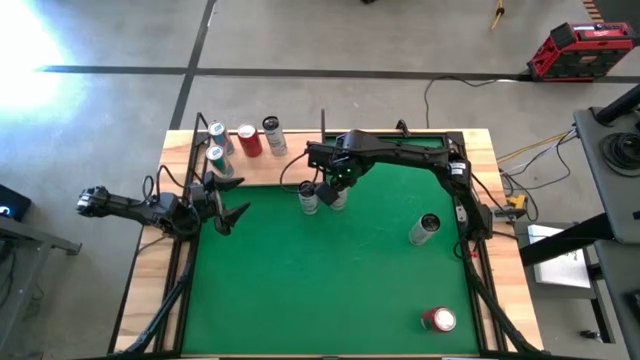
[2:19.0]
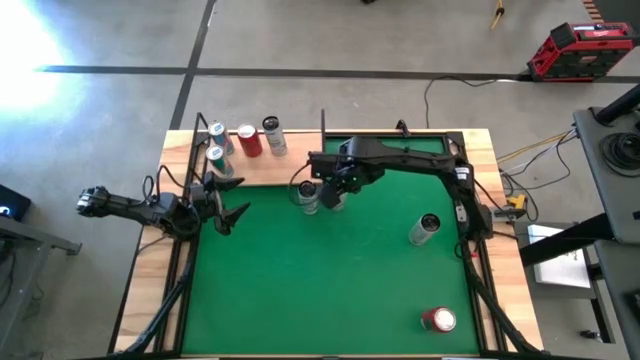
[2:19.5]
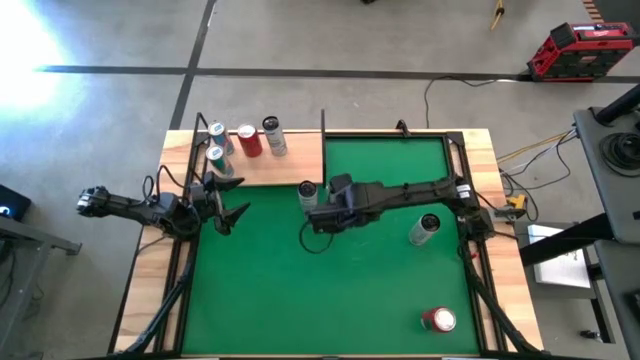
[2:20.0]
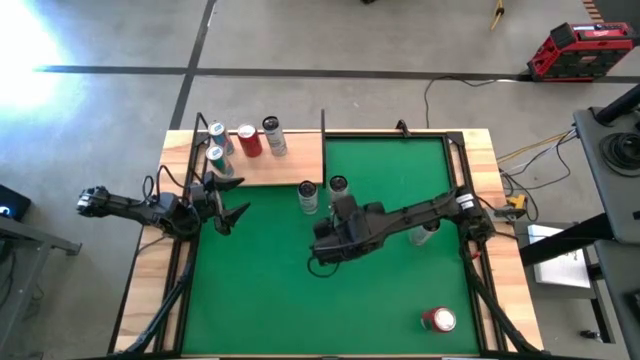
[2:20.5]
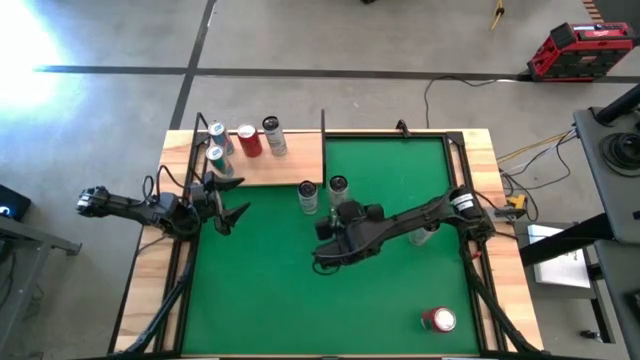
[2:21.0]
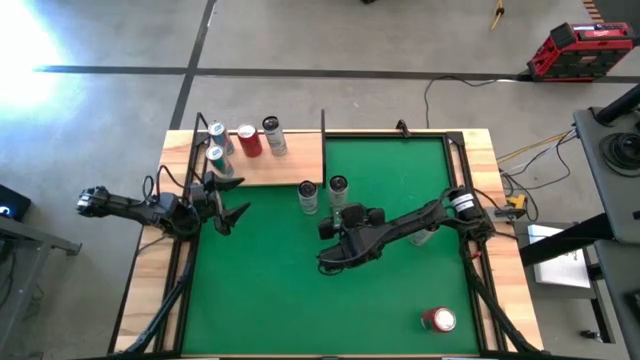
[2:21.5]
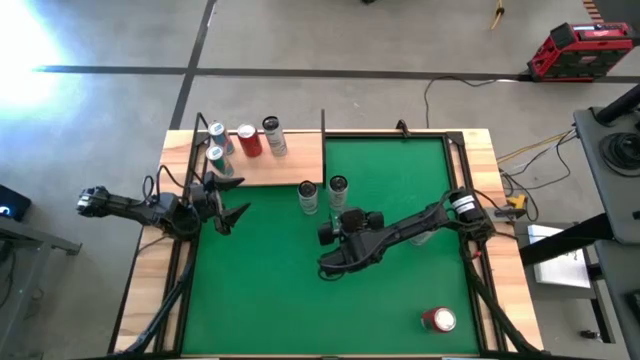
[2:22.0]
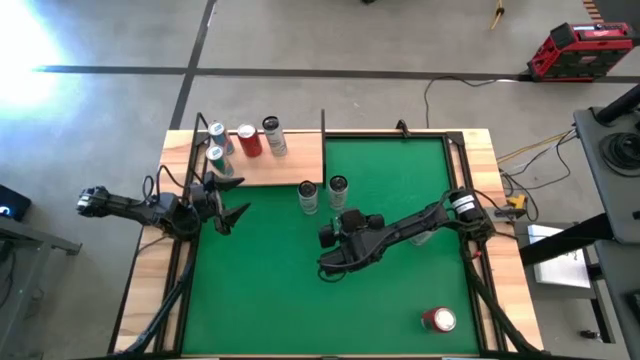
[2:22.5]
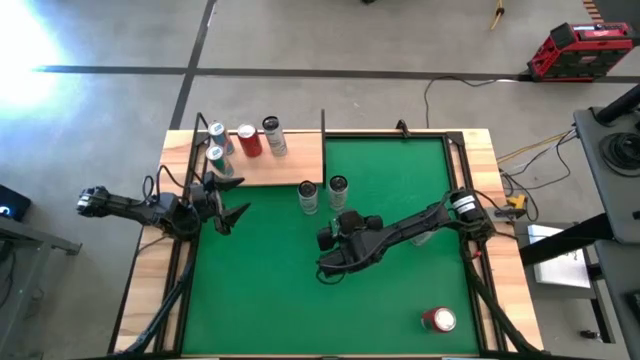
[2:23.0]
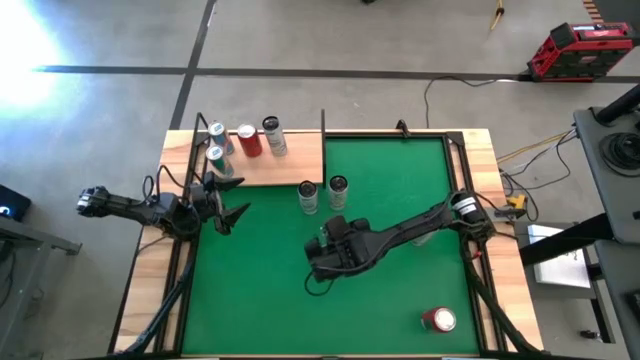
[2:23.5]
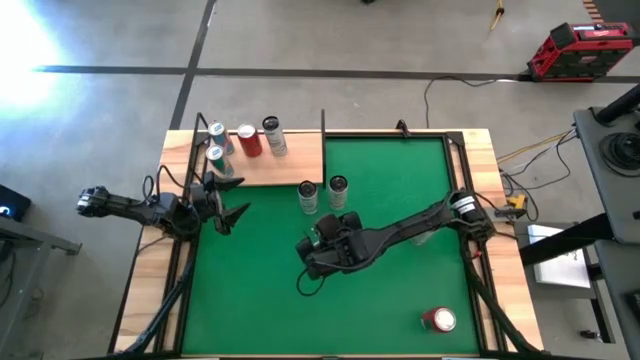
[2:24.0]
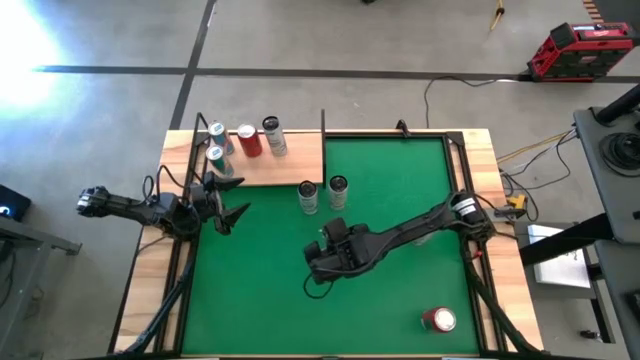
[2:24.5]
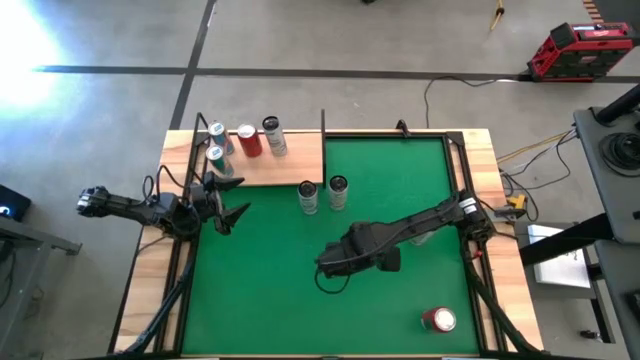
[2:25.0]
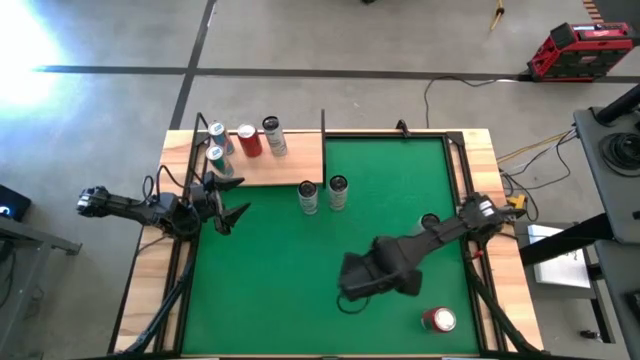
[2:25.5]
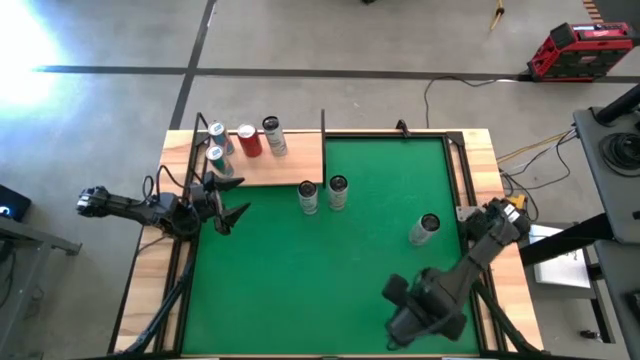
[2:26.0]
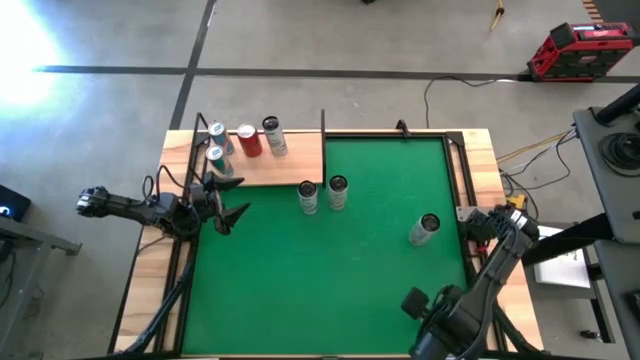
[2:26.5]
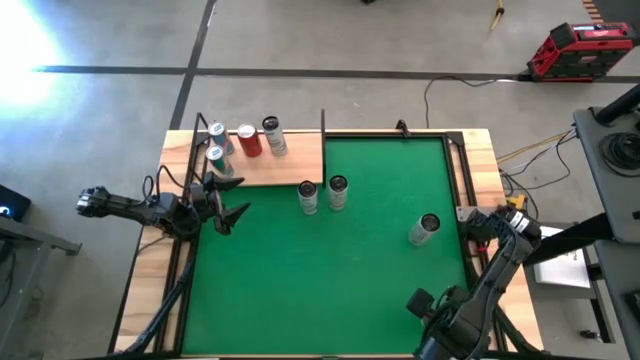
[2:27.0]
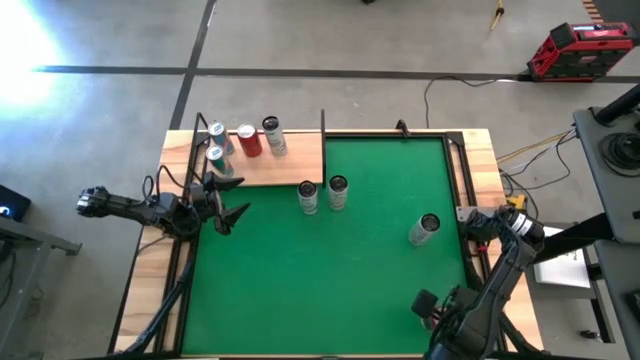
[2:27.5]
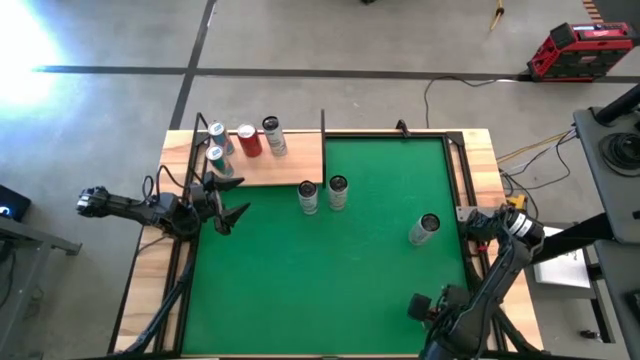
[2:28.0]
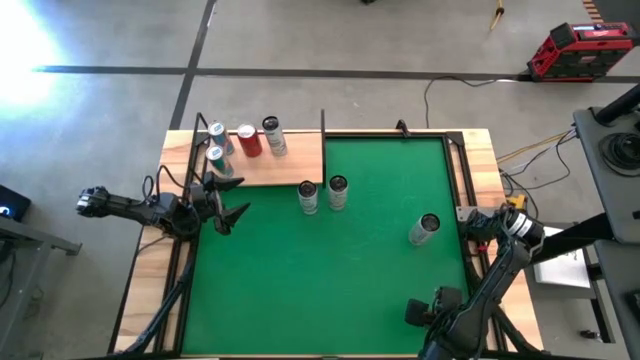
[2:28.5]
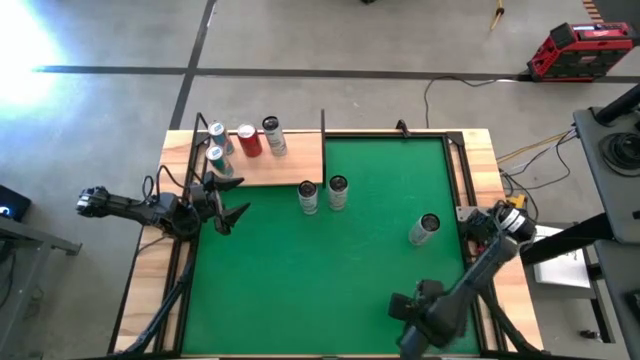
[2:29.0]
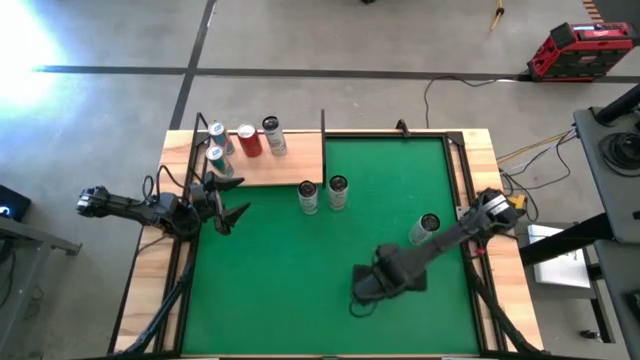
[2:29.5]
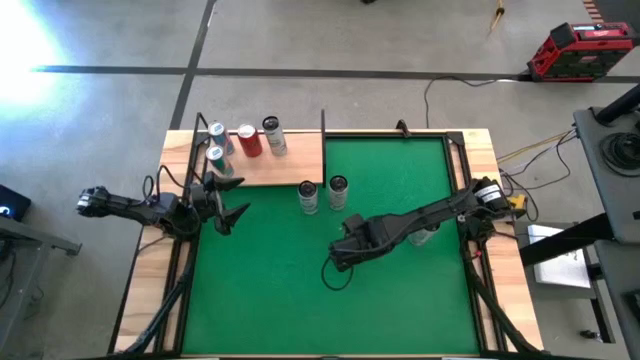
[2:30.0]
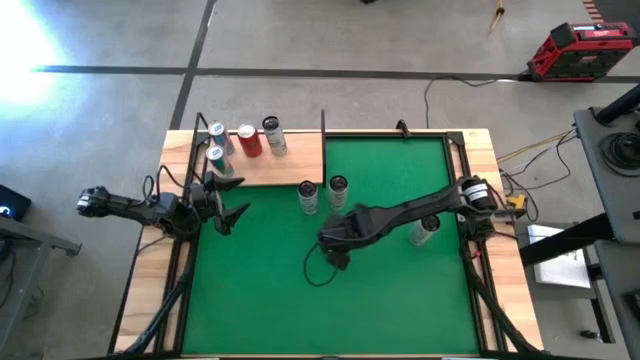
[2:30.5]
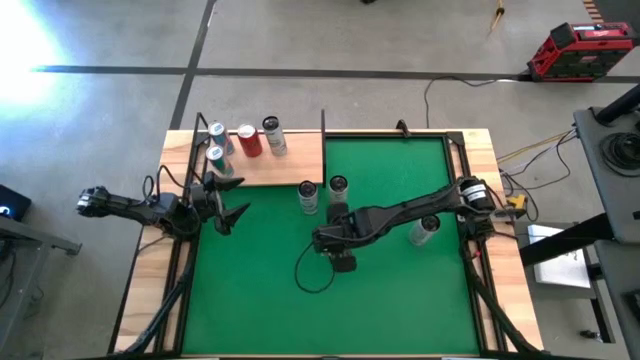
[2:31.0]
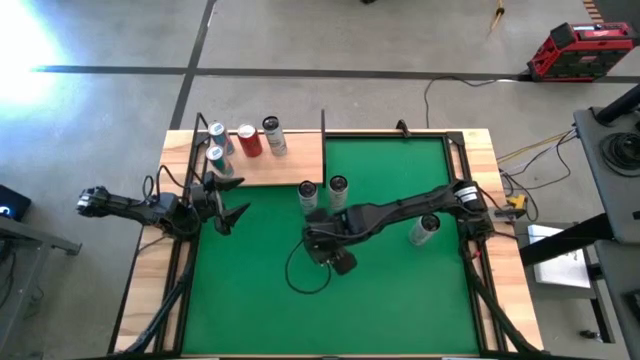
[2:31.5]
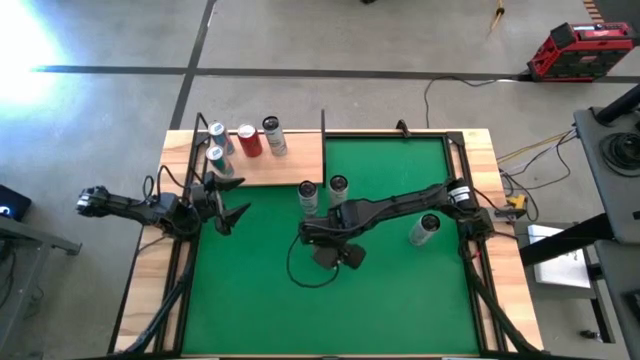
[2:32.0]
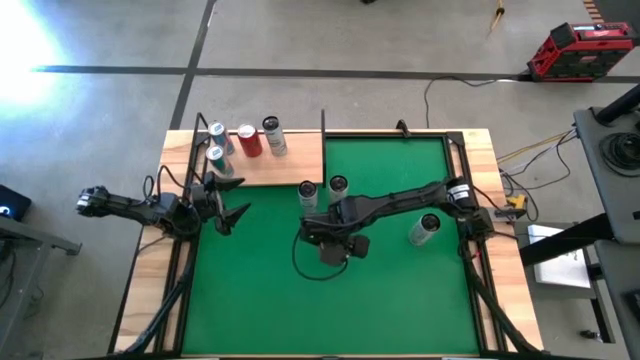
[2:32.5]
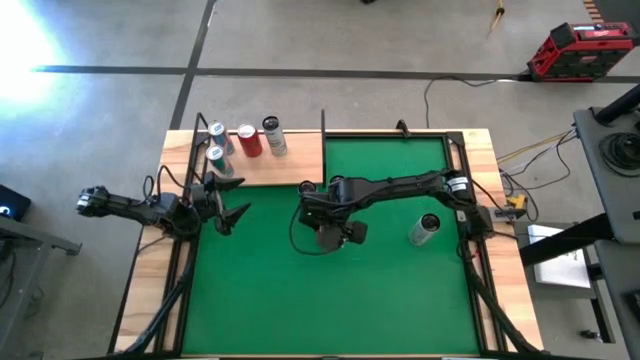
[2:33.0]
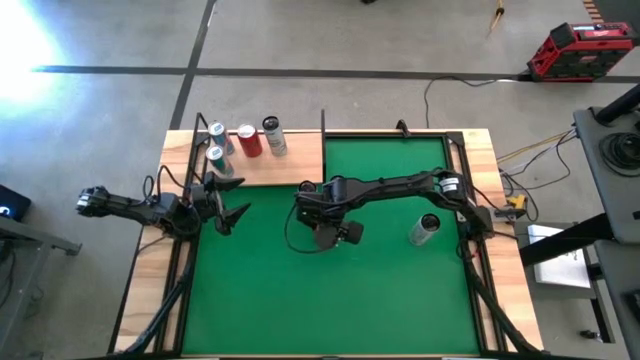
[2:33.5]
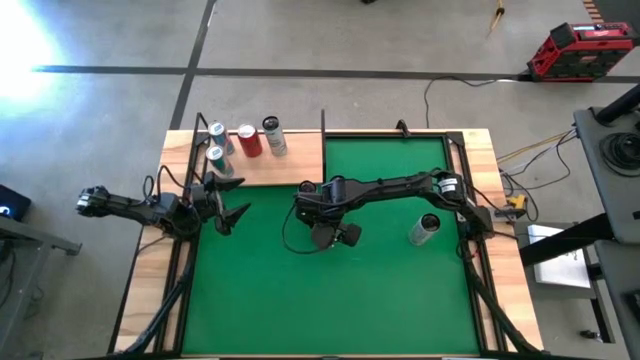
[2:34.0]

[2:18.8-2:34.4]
Task: Place canned beverage on shelf
Move the red soda can to the center of the table

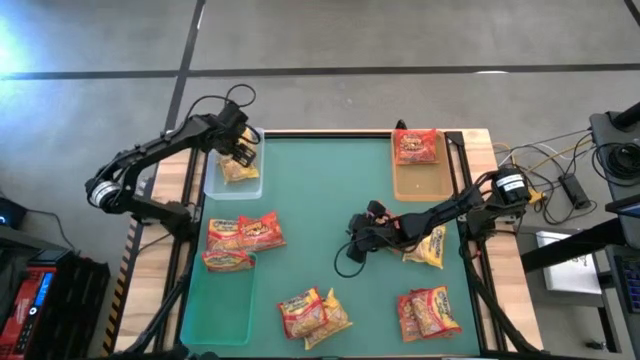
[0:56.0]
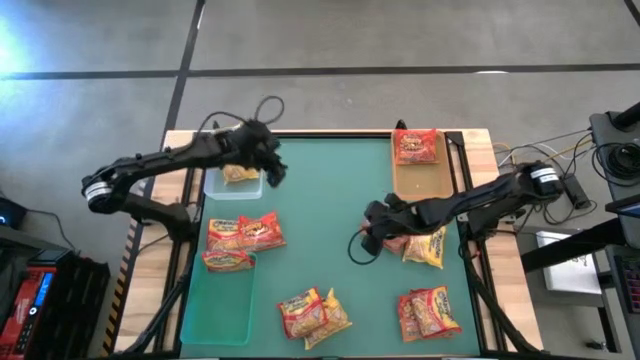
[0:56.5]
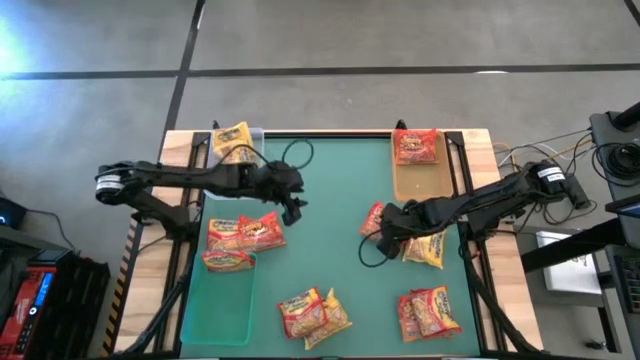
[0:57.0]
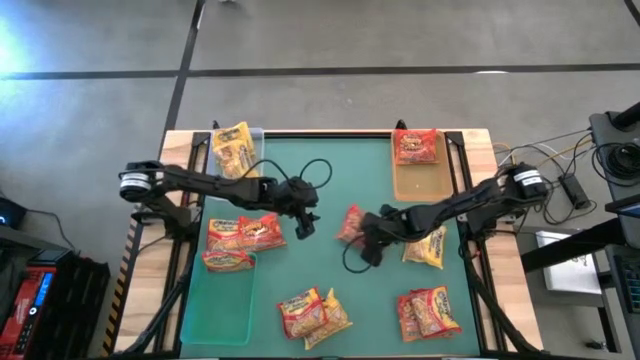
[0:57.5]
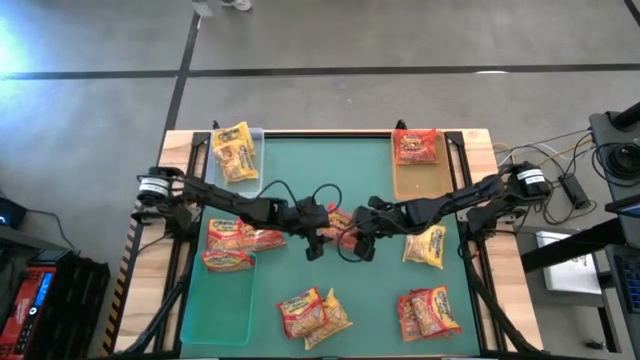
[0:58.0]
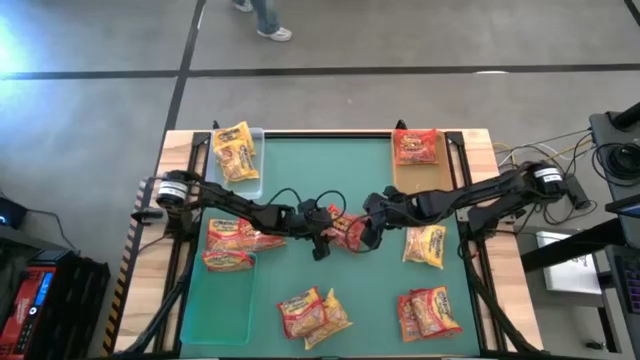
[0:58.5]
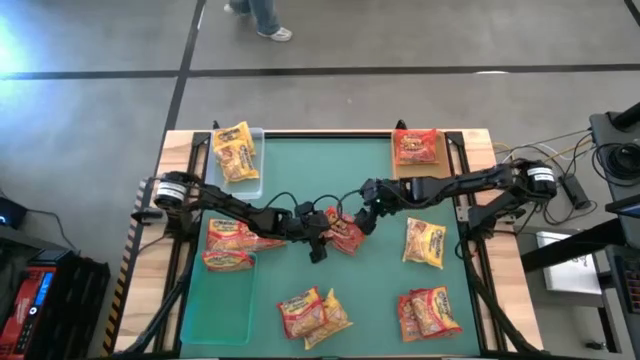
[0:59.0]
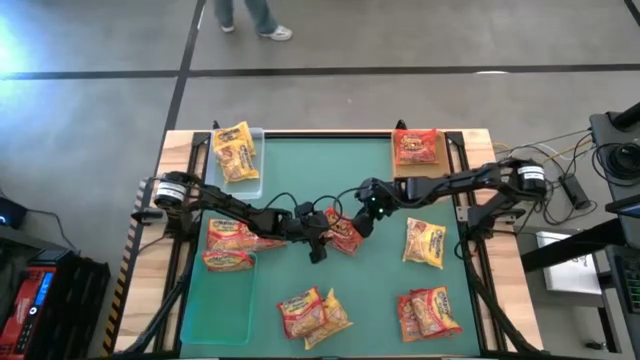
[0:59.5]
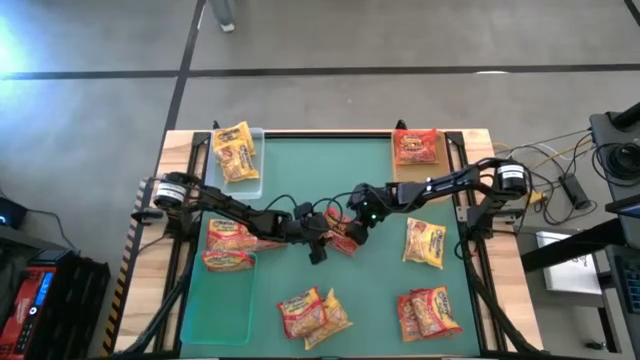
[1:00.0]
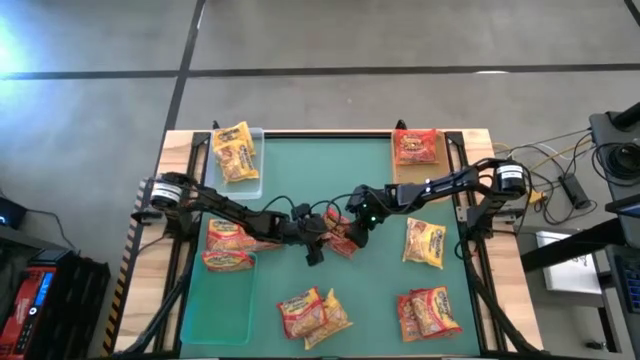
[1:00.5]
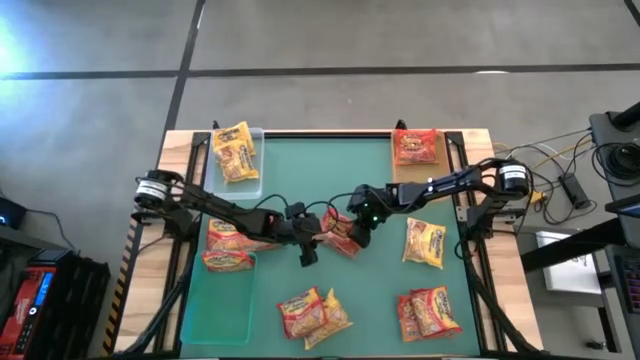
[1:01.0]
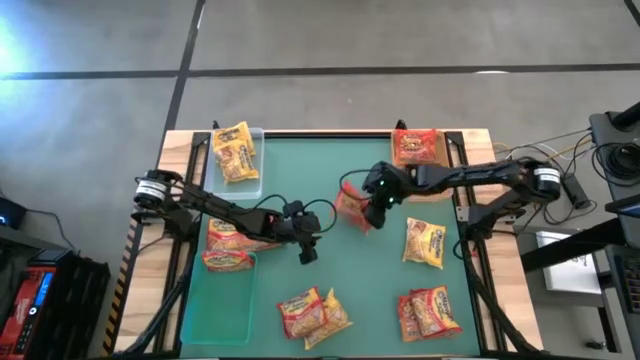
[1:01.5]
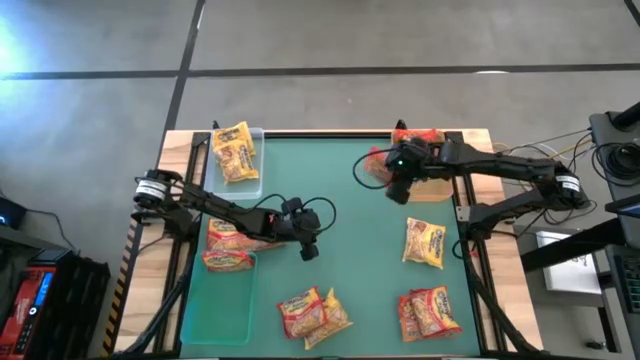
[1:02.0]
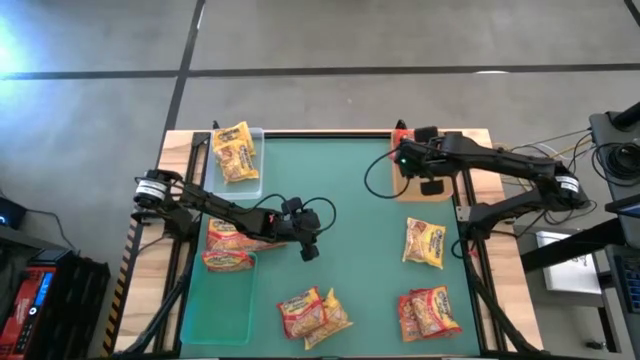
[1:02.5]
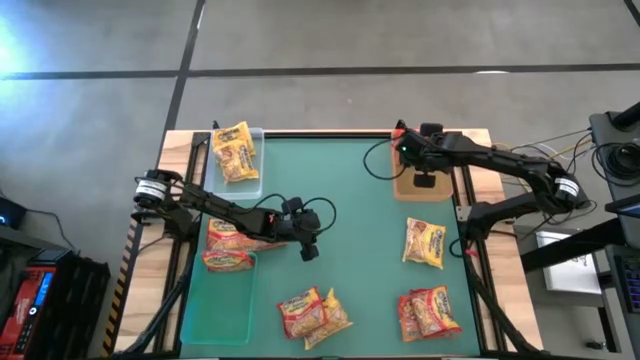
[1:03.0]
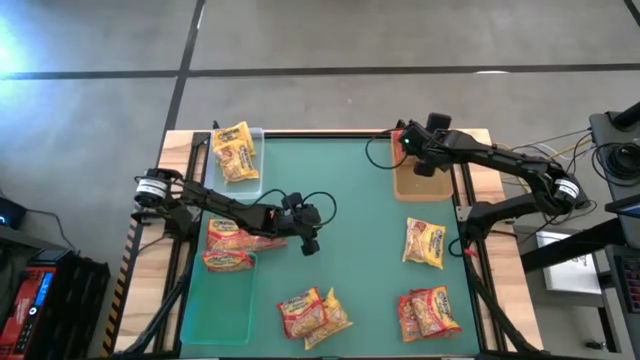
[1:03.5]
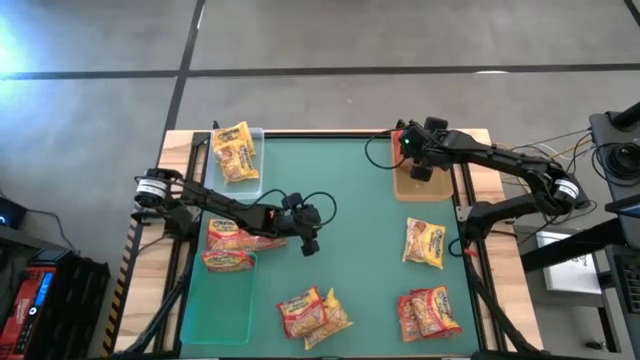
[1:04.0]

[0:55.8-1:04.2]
Task: Sort Maruchan noodles
Put the orange noodle pack into the orange bin
